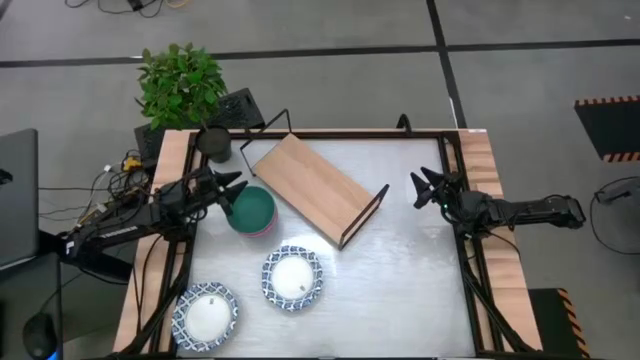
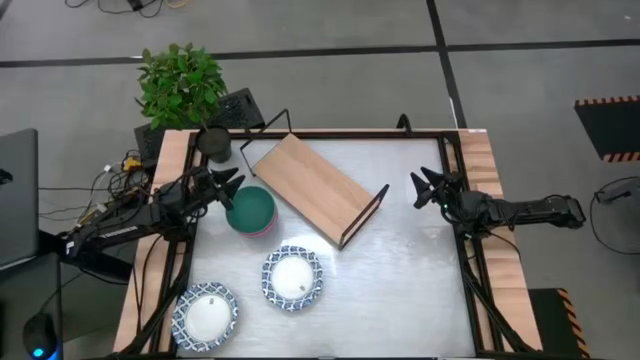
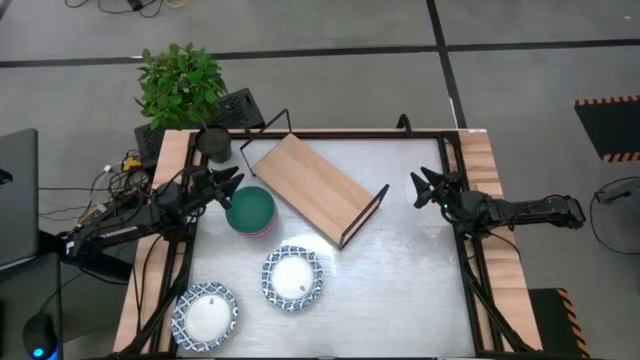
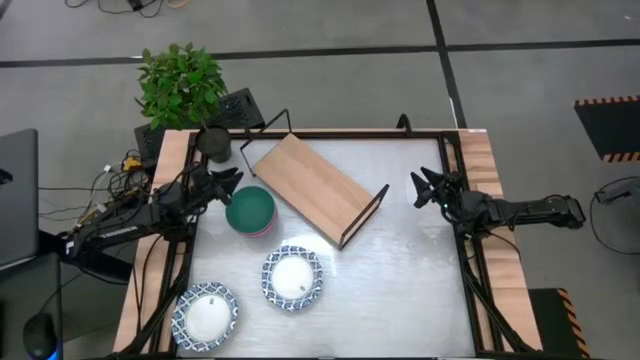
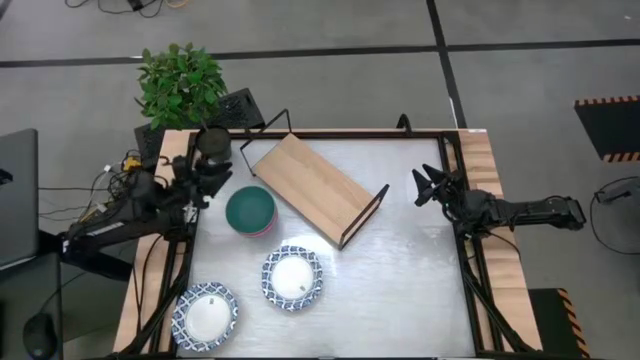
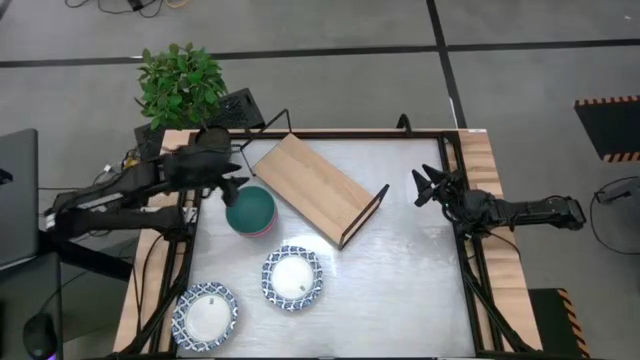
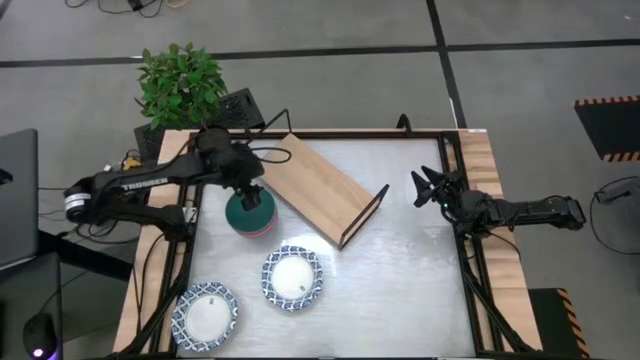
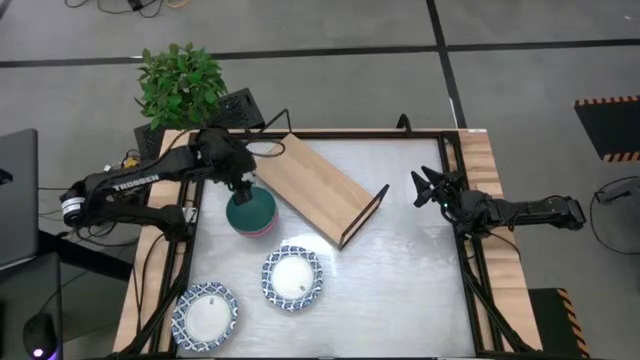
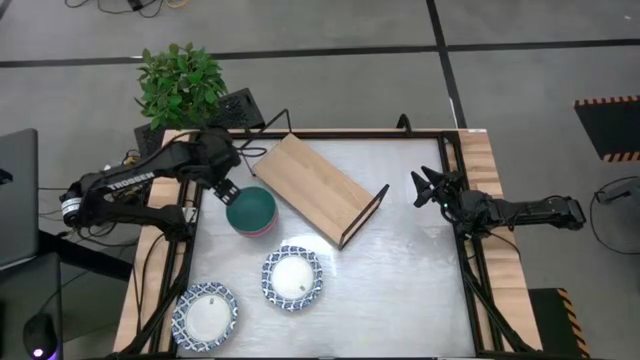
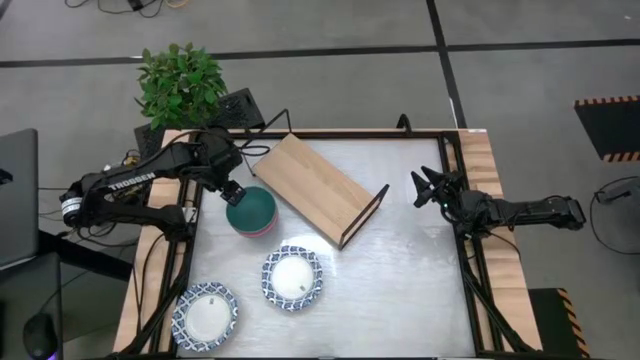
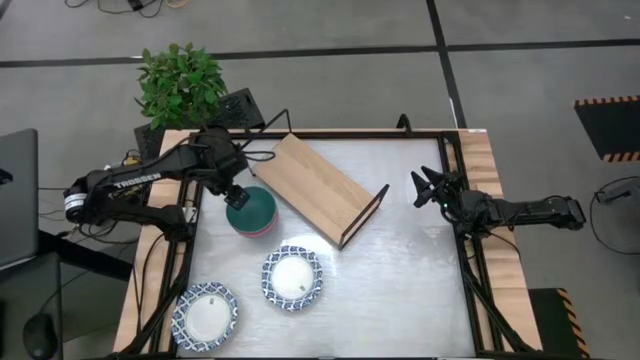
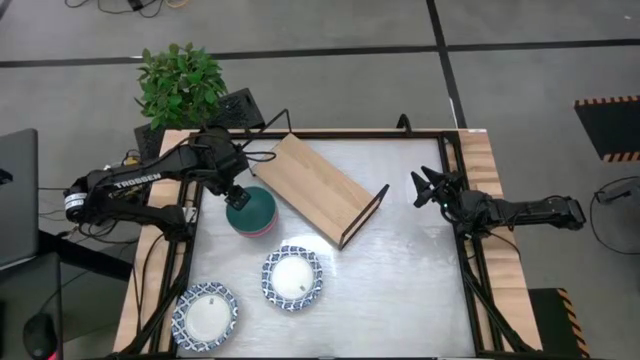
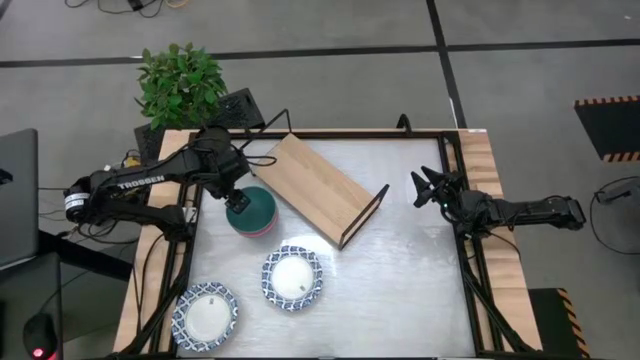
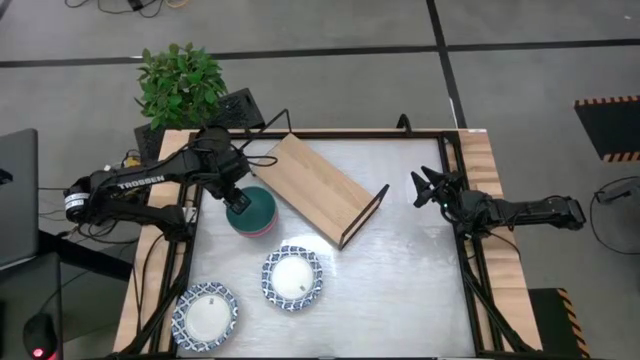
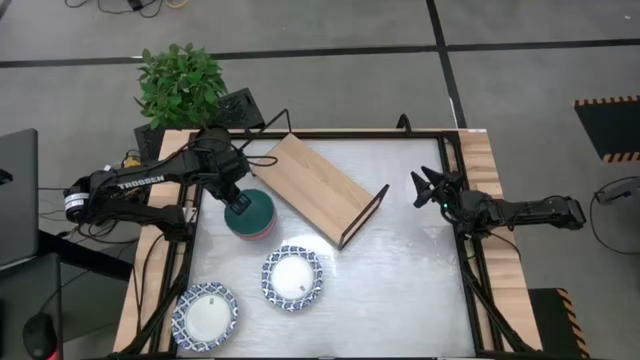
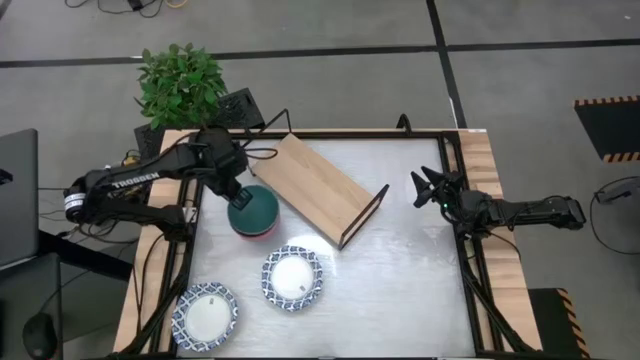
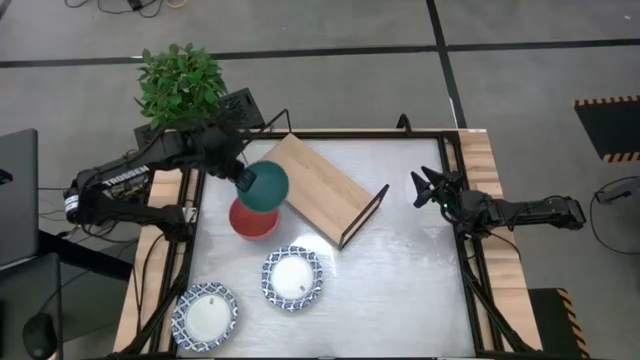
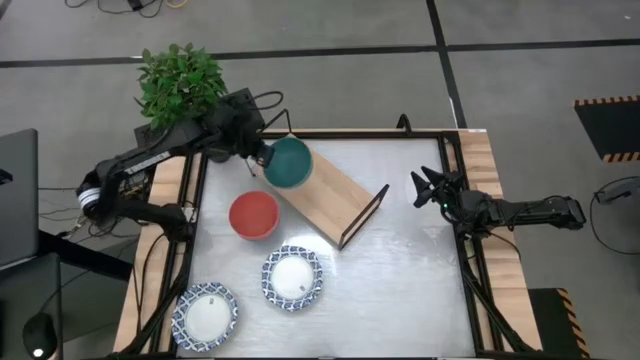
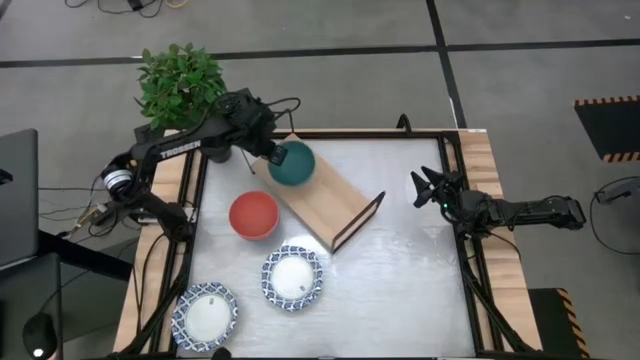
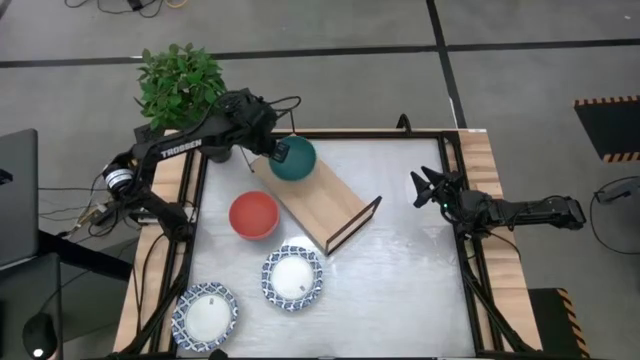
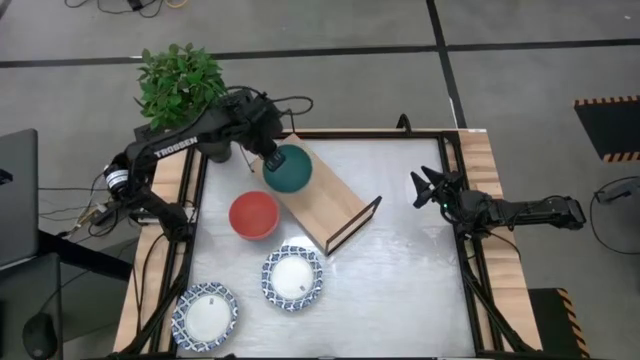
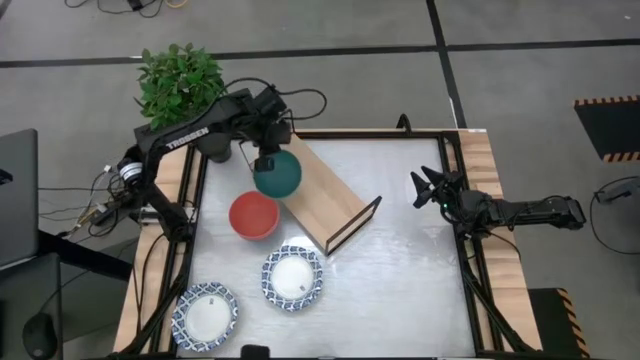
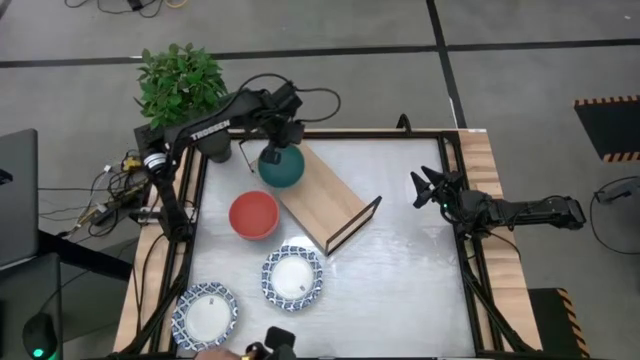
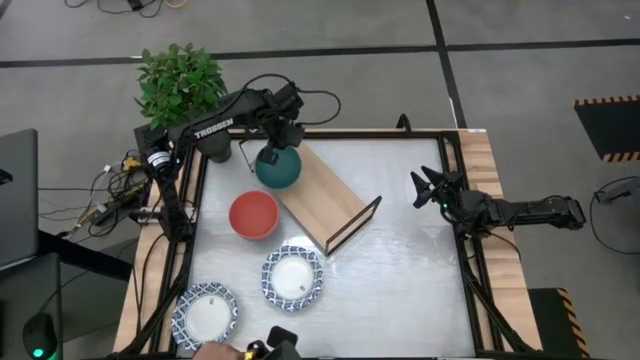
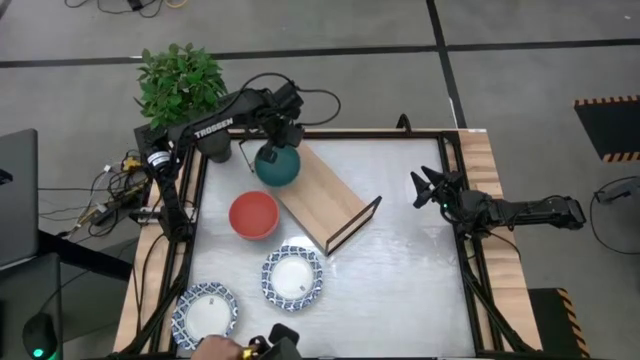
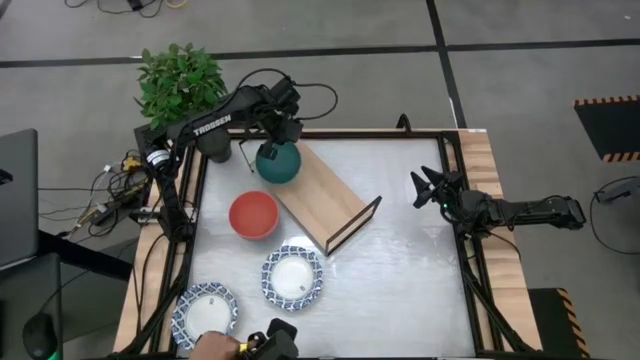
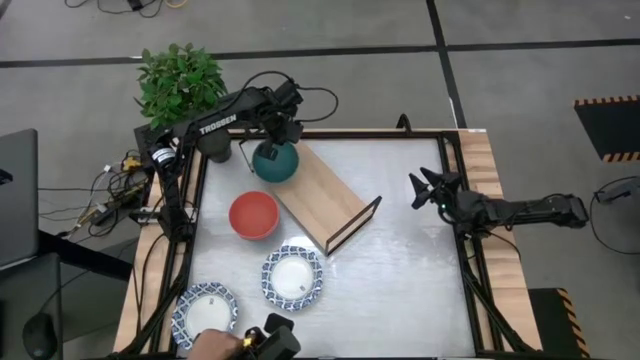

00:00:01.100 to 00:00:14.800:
Task: Place and stack bowls onto a shelf
Put the green bowl on the shelf

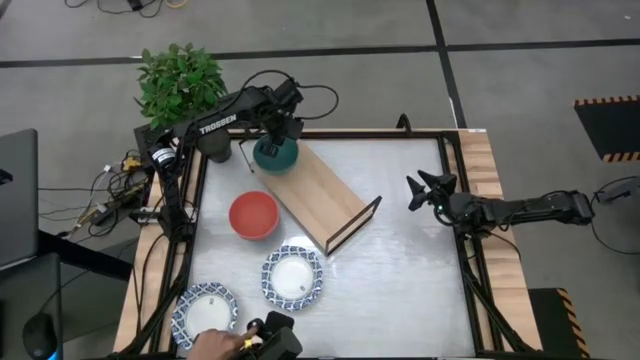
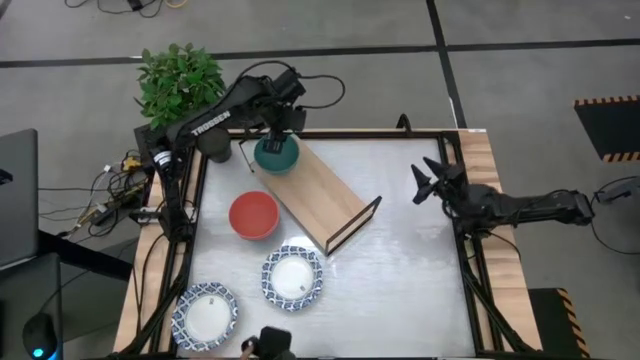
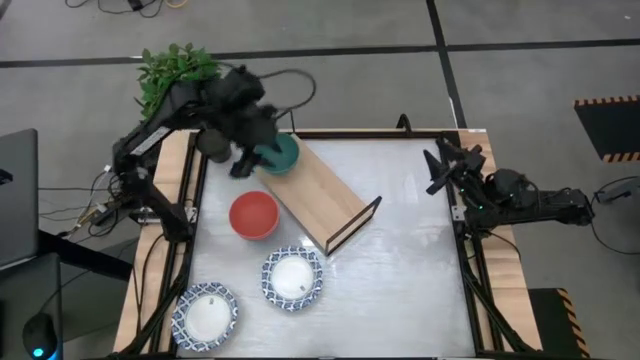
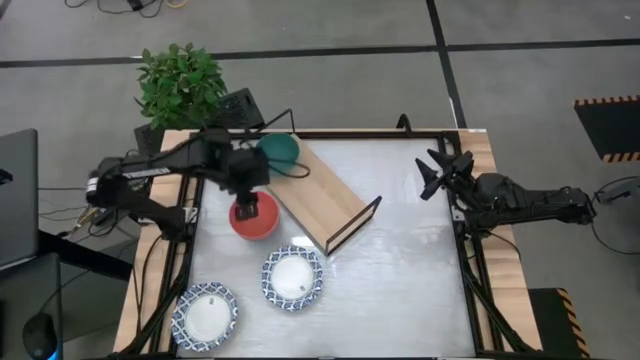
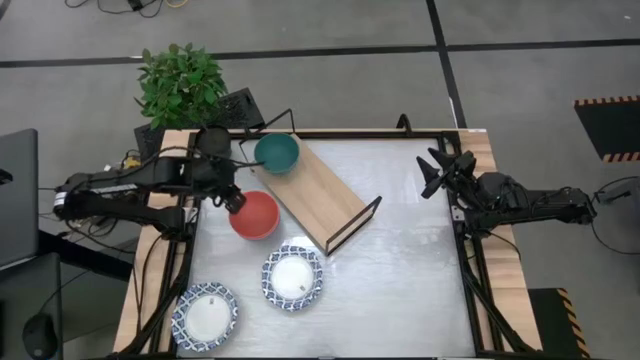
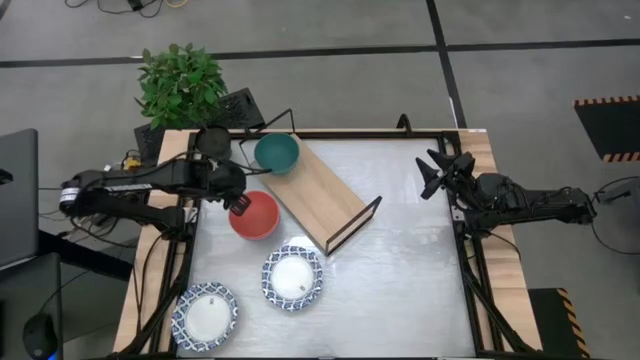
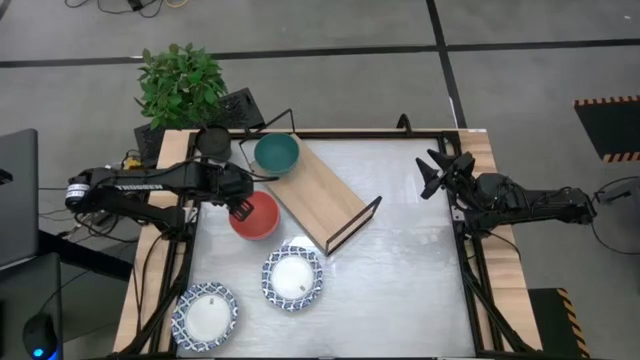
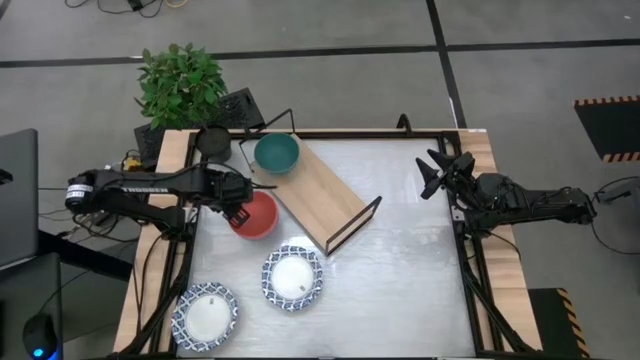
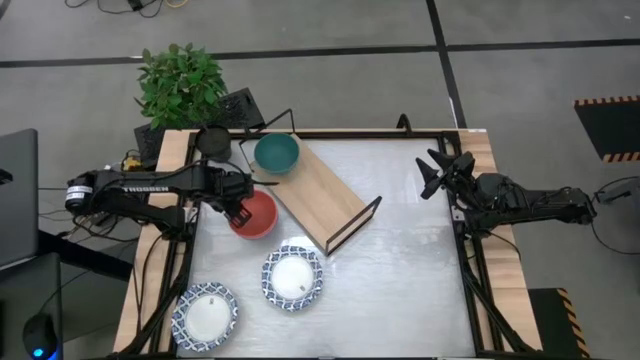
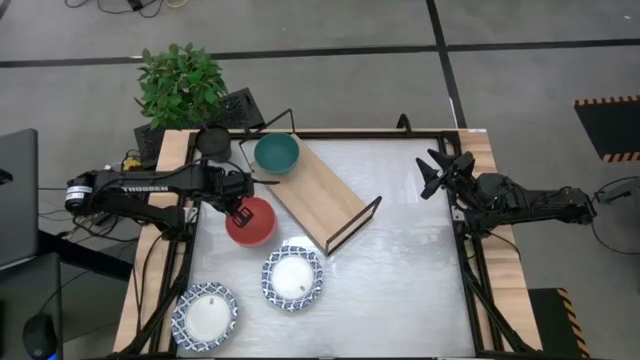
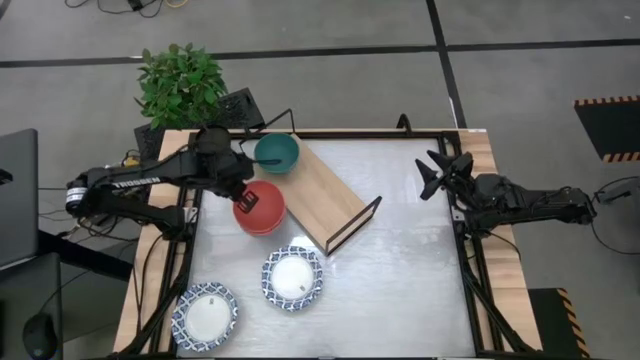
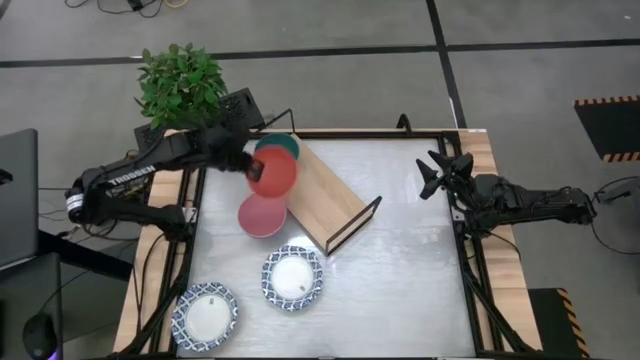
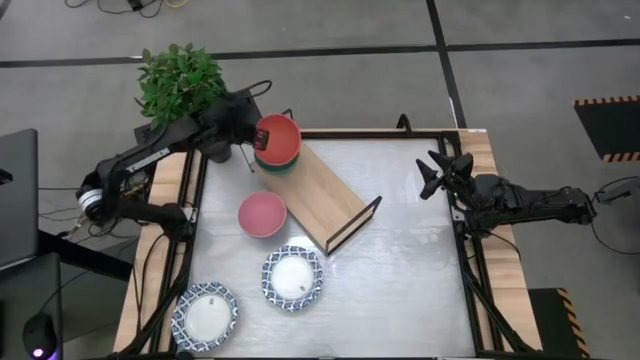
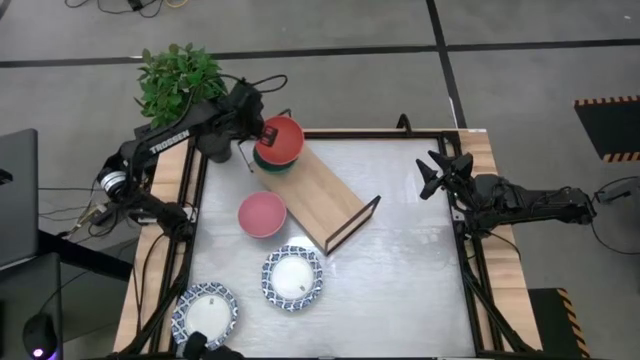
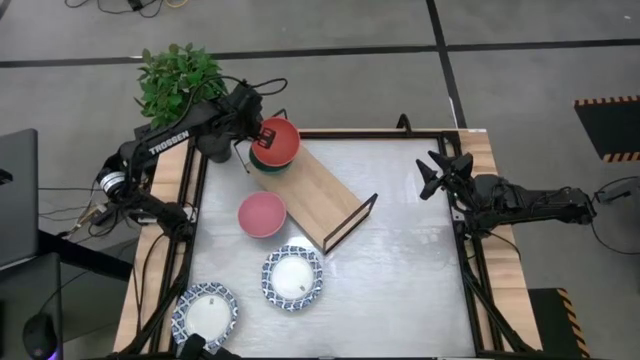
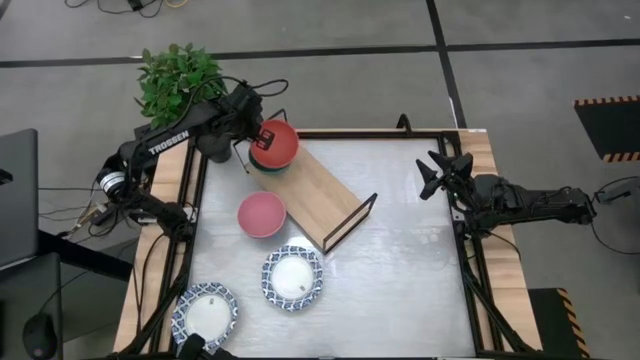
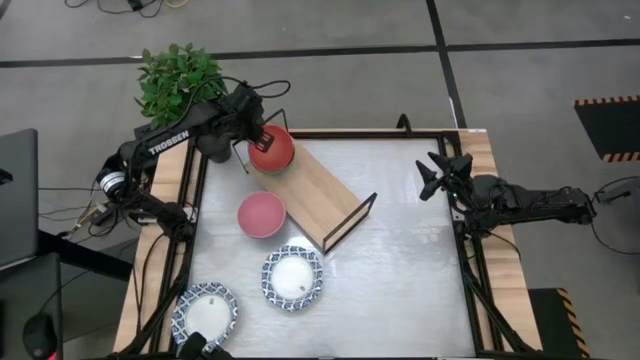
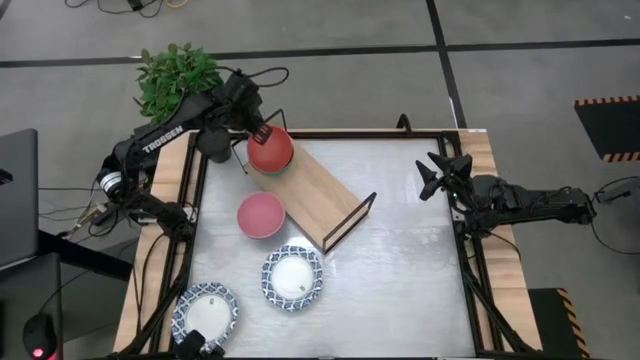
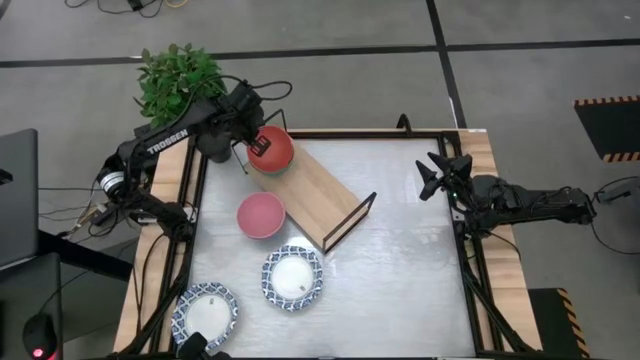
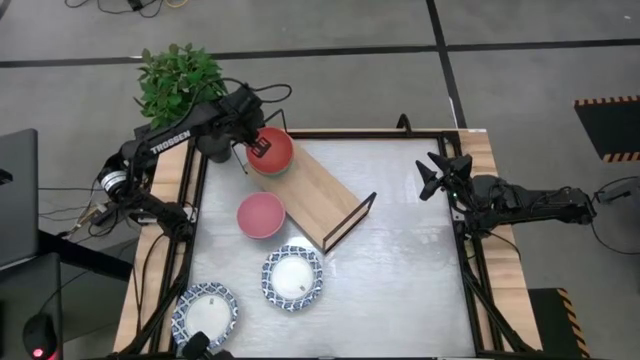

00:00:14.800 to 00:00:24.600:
Stack the orange bowl on the green bowl
